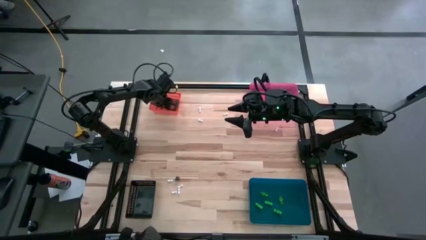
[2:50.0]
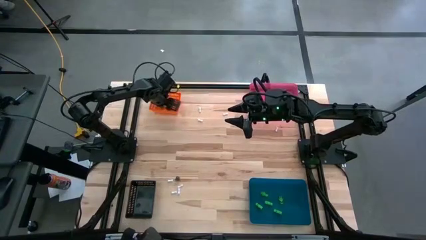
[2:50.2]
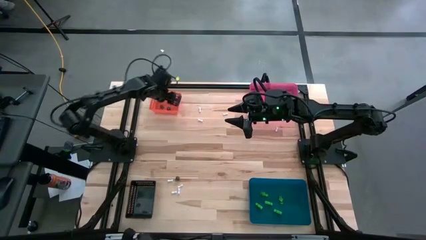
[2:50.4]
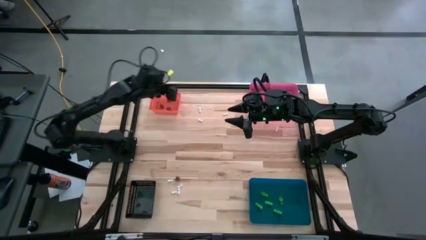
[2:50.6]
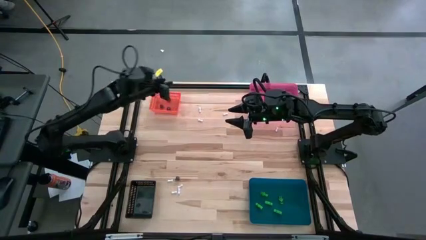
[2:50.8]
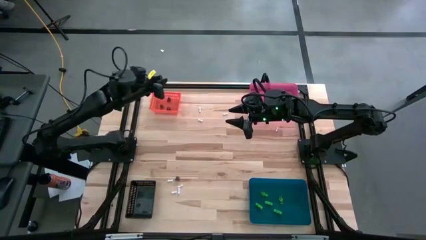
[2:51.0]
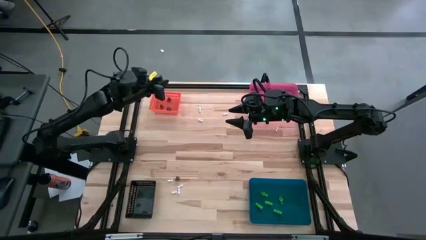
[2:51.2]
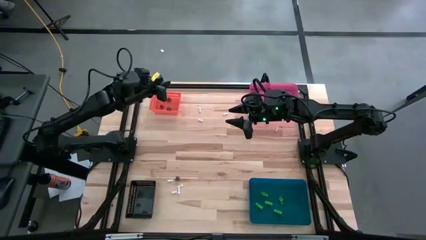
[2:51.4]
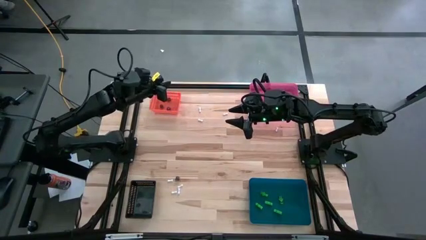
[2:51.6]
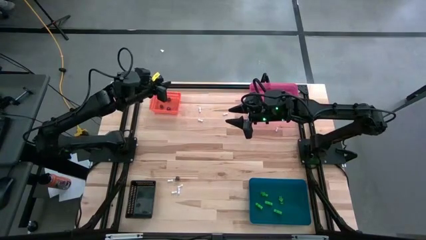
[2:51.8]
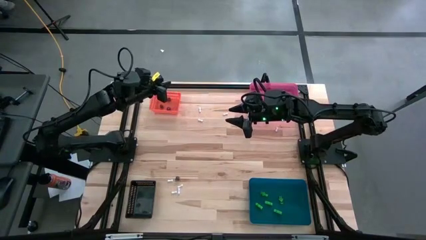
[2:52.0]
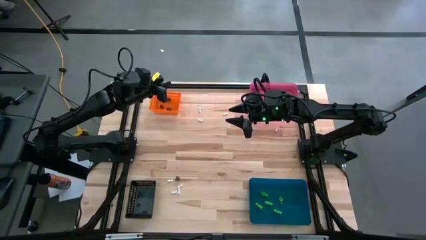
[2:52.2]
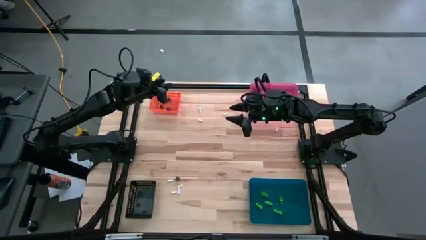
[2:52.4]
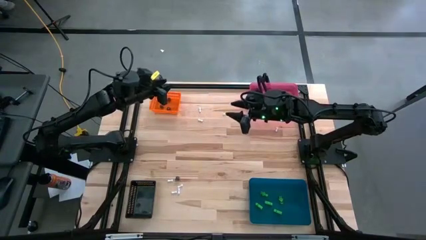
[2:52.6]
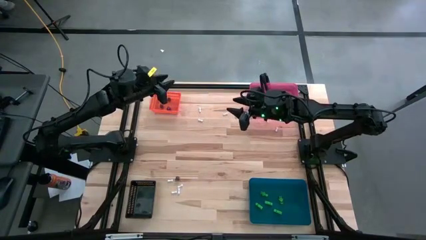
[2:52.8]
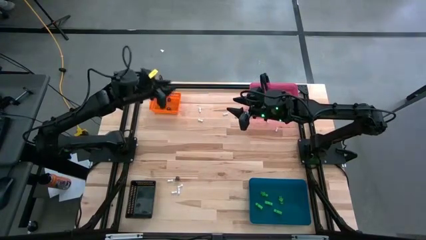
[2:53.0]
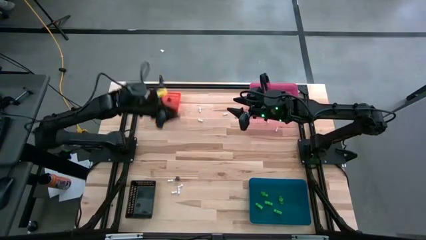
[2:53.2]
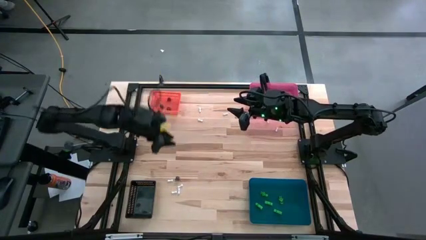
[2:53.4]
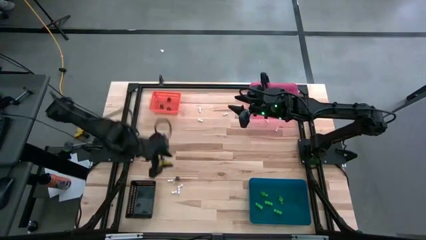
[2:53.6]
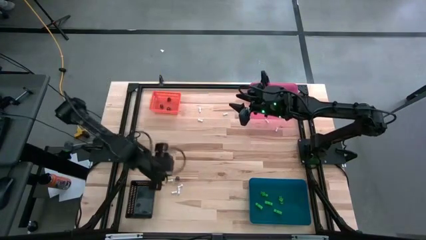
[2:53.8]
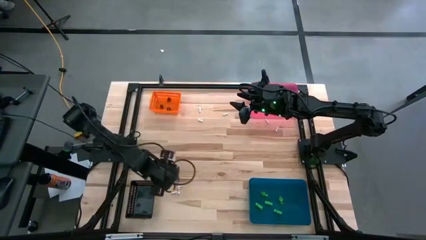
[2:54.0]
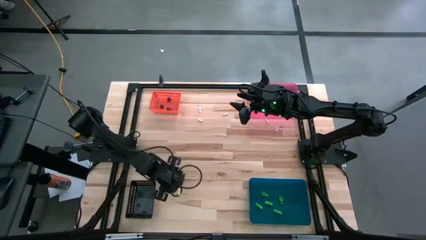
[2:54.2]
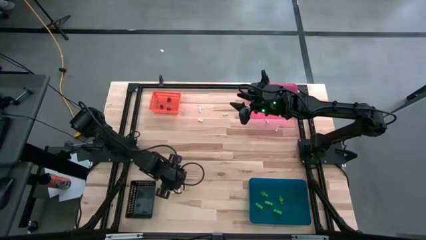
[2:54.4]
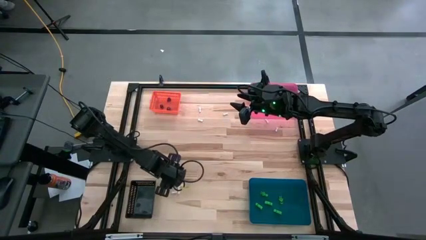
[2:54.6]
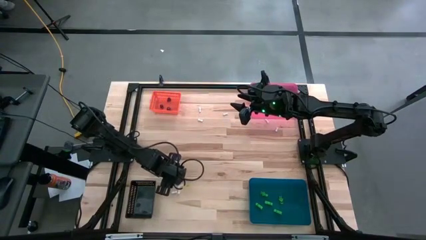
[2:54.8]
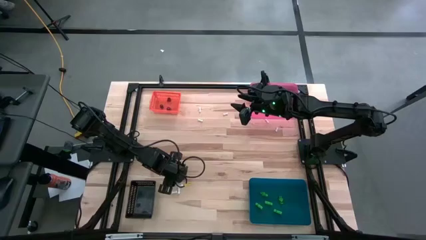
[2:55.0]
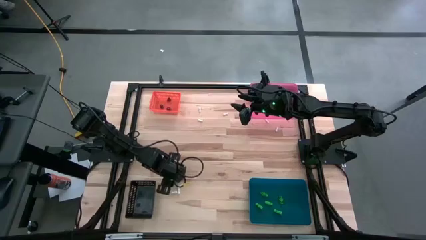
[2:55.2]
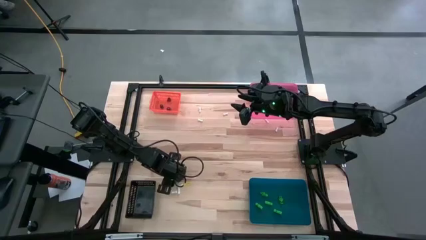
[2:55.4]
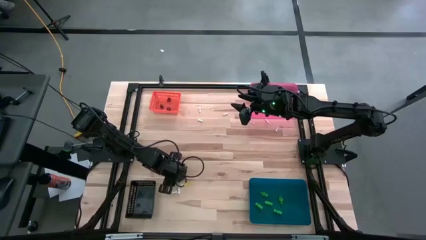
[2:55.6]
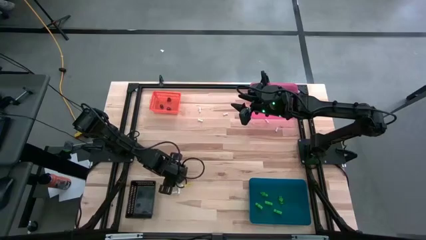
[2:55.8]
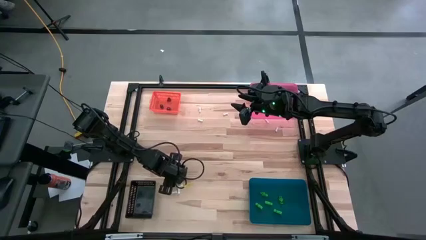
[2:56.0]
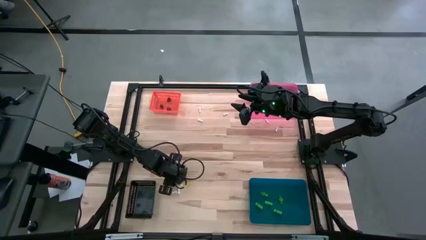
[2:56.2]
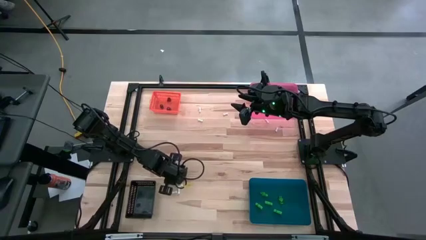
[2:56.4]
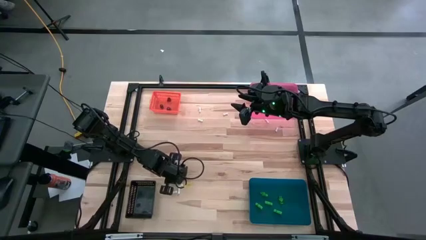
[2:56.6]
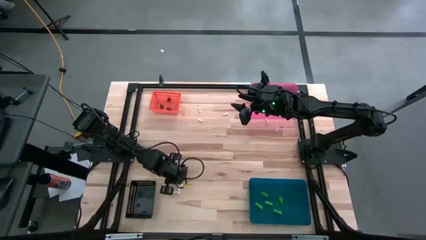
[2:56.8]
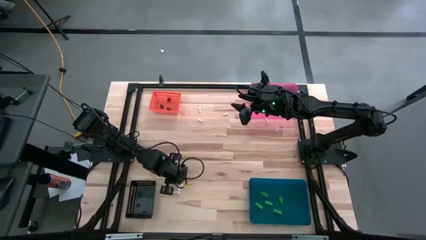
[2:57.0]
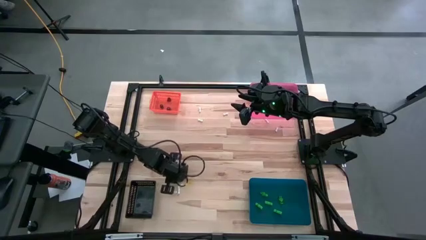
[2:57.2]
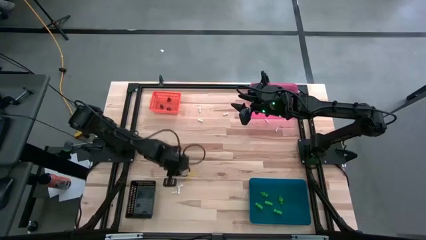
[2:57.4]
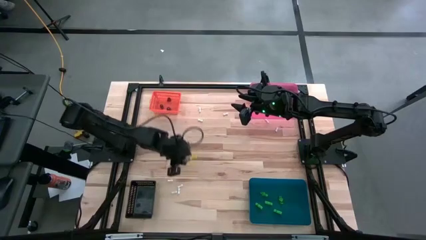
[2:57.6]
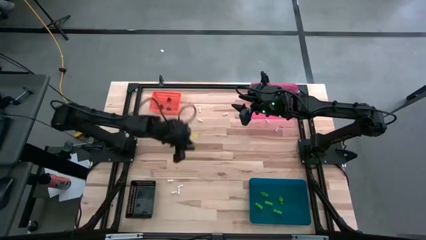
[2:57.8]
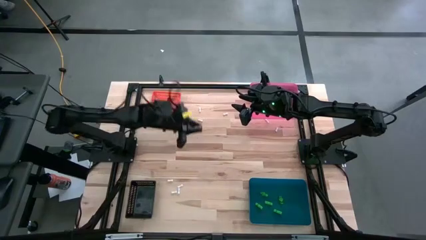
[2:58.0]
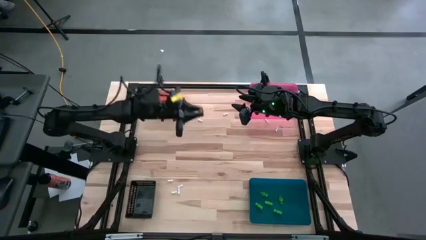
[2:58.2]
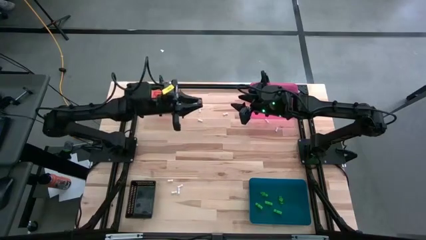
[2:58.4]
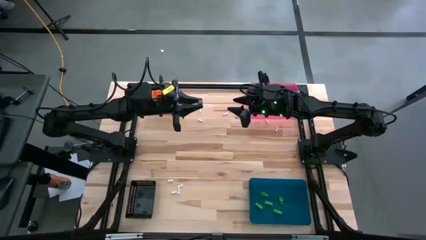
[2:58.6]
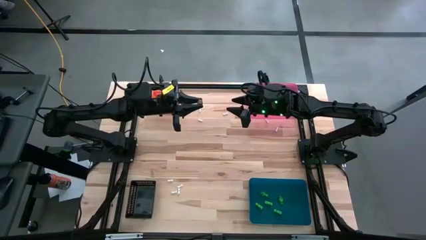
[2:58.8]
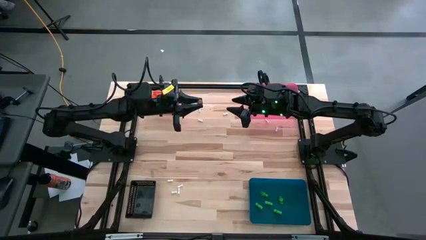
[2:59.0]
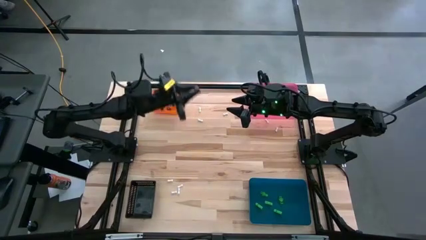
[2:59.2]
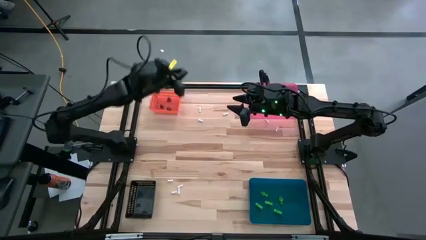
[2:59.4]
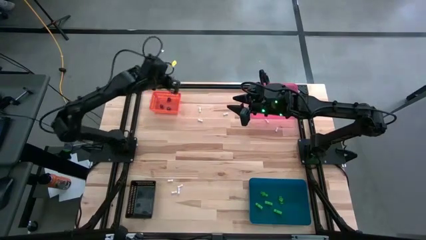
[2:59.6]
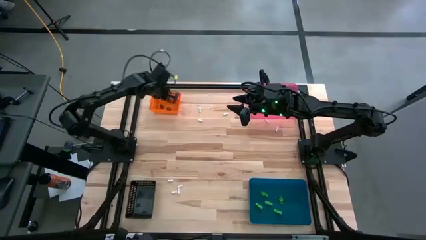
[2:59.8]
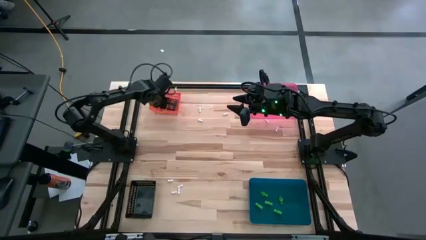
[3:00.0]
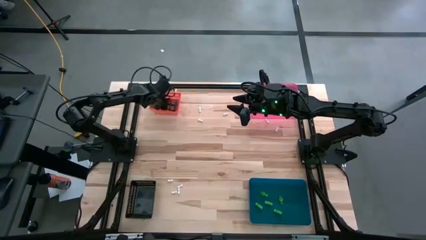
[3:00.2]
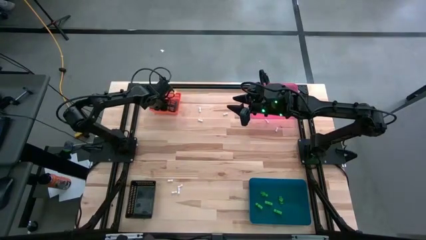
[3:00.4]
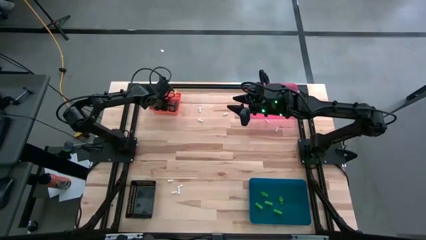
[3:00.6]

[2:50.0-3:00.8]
Task: Sort Halloween decoration
Put the black skull toy into the orange bin

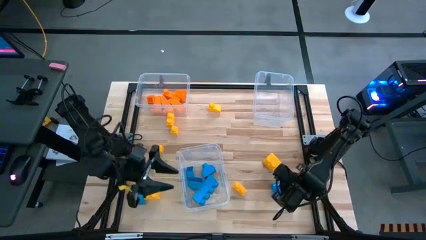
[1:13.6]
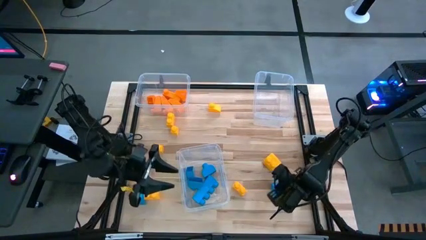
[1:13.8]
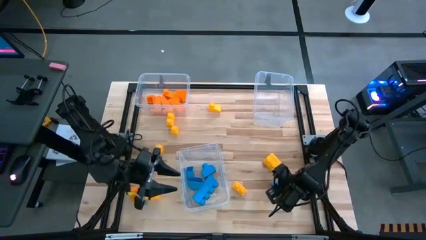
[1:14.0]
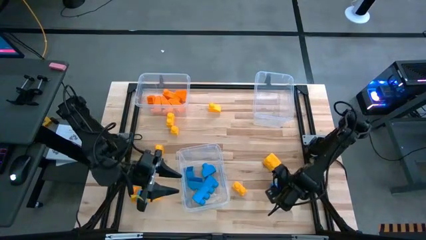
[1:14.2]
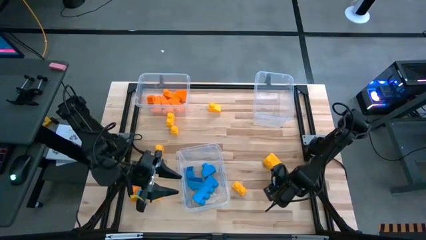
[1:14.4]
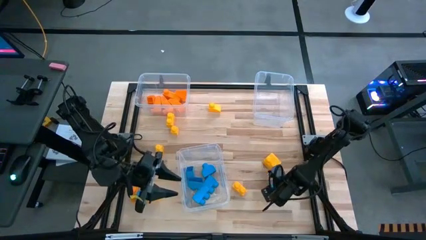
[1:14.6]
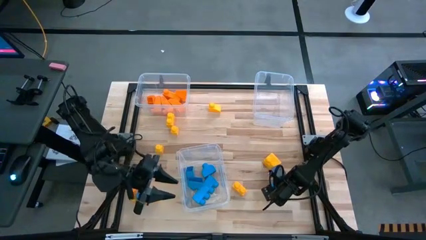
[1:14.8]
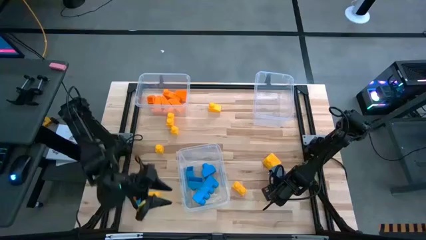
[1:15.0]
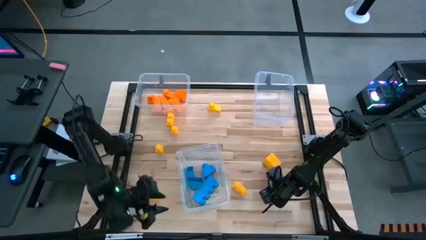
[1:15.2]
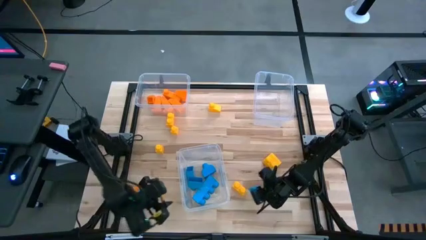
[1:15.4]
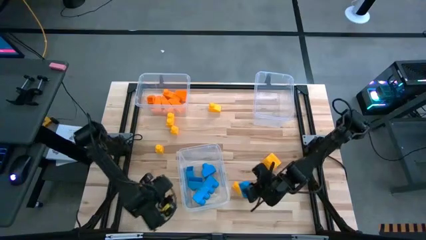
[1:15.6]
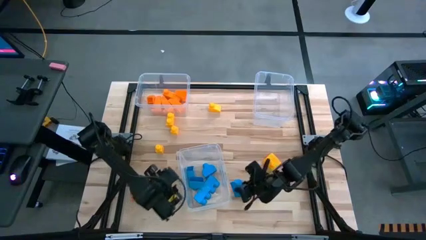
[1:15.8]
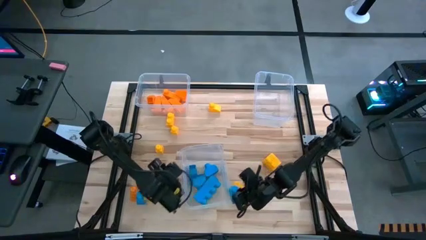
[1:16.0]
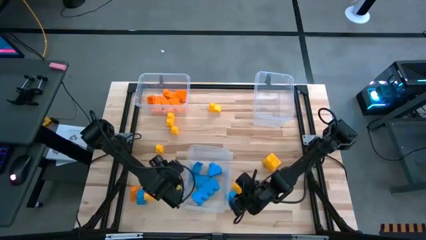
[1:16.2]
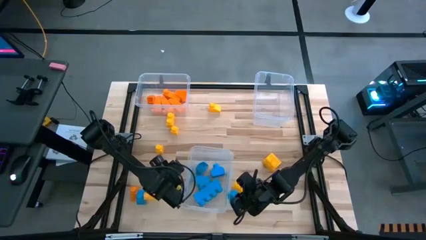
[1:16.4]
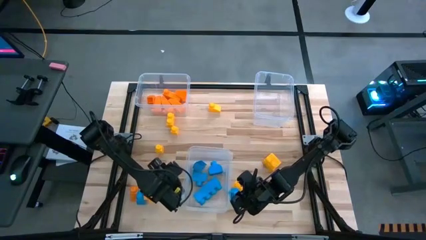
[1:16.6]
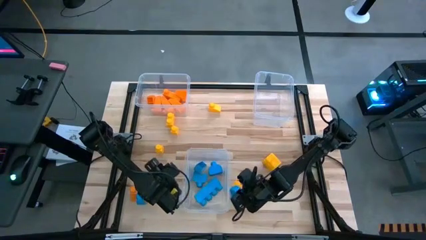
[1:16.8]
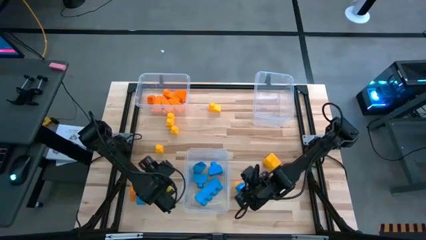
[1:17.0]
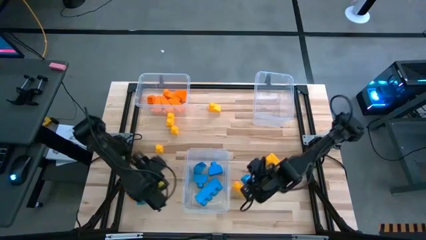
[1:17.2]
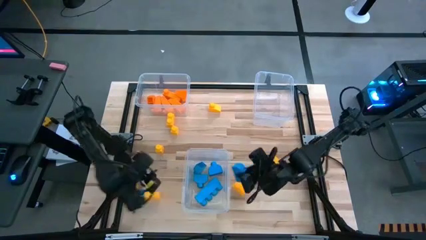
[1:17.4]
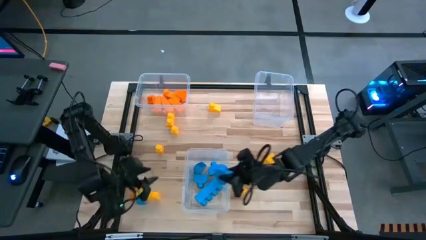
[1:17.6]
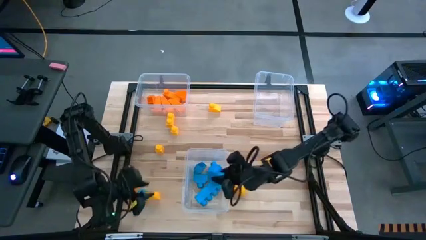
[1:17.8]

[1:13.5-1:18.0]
Task: Sort blocks
Put the blue game piece into the bottom transparent bin

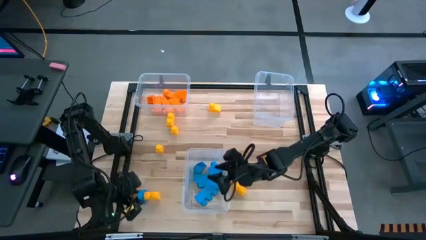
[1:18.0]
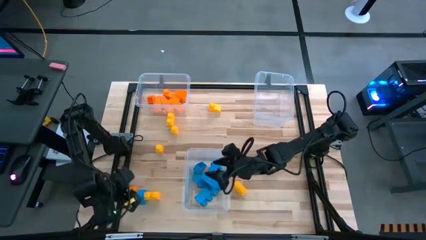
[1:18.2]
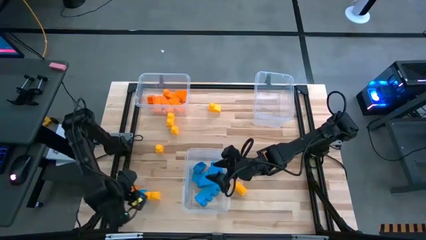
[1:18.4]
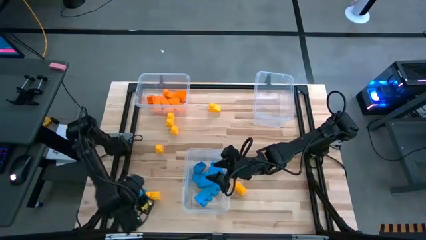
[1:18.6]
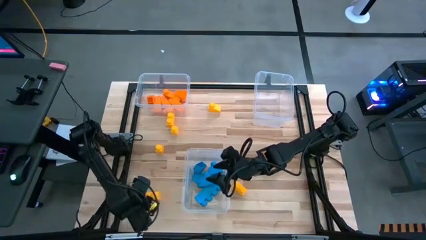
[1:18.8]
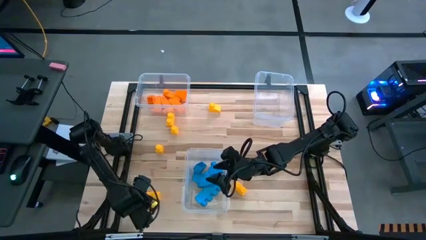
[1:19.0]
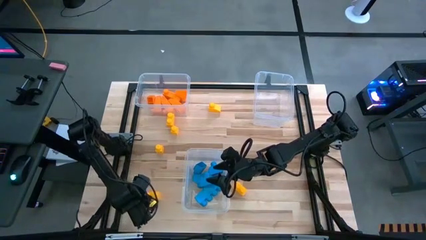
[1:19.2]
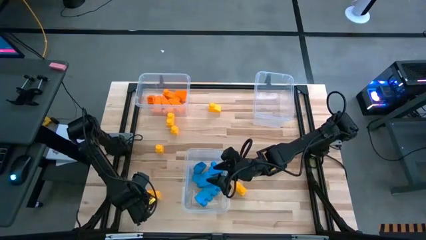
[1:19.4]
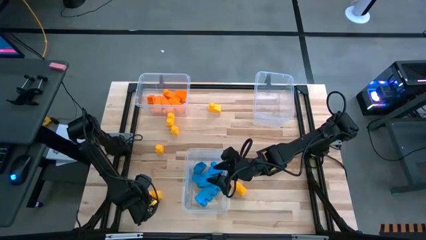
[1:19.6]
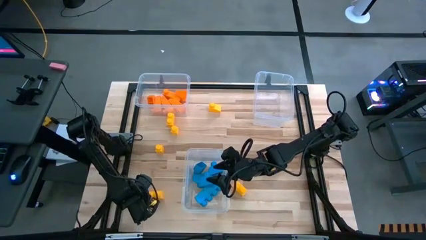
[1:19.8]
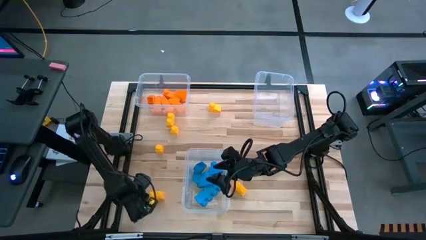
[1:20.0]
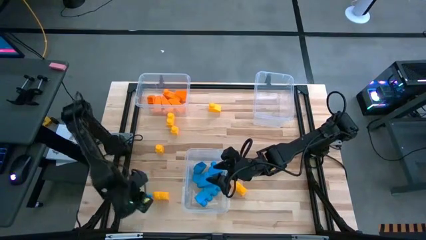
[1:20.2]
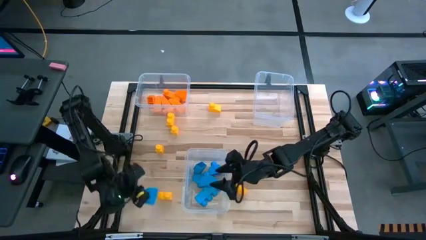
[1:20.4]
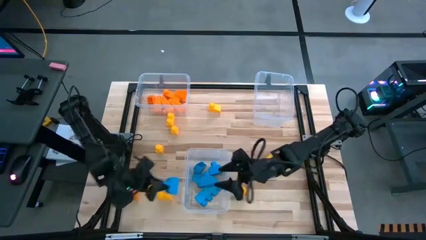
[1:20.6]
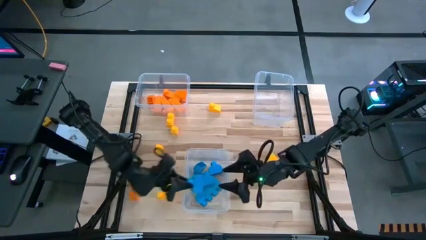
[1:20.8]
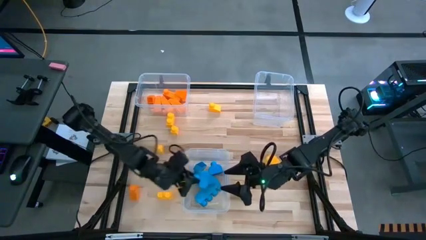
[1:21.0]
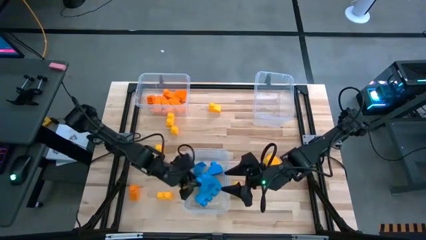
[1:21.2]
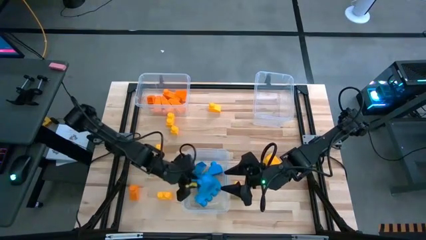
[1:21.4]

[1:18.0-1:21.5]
Put the blue game piece into the bottom transparent bin
